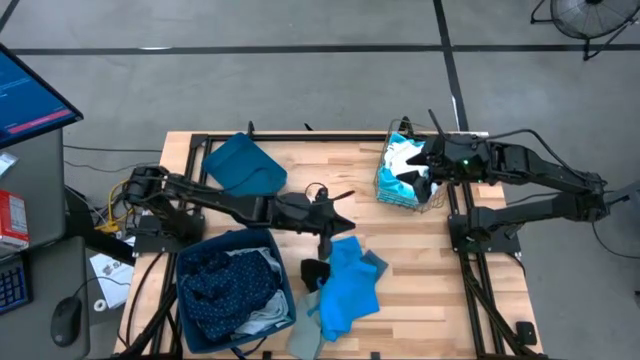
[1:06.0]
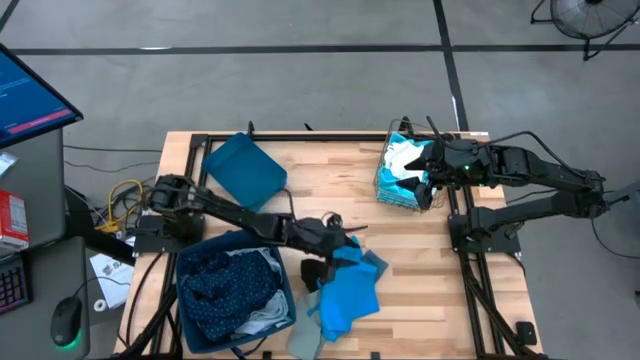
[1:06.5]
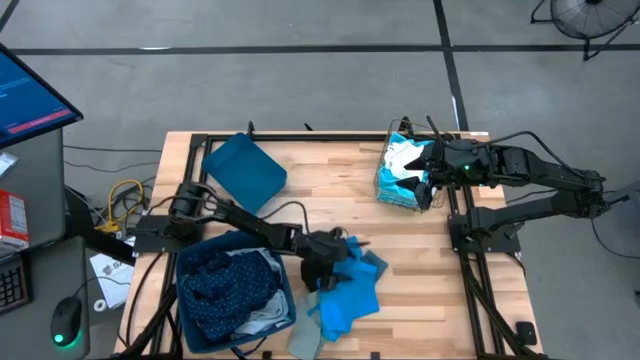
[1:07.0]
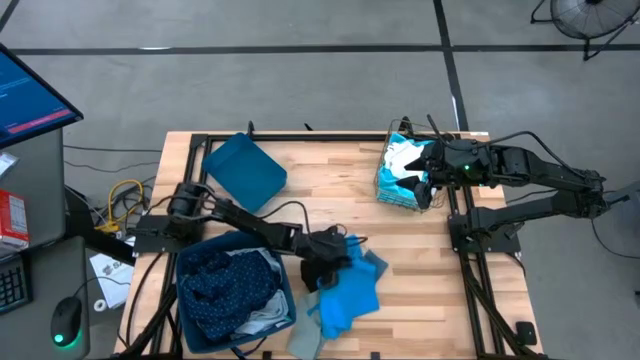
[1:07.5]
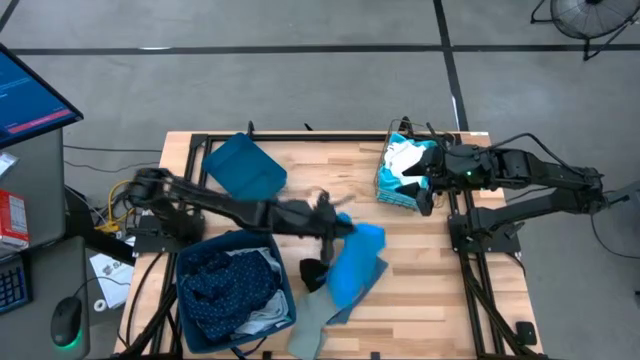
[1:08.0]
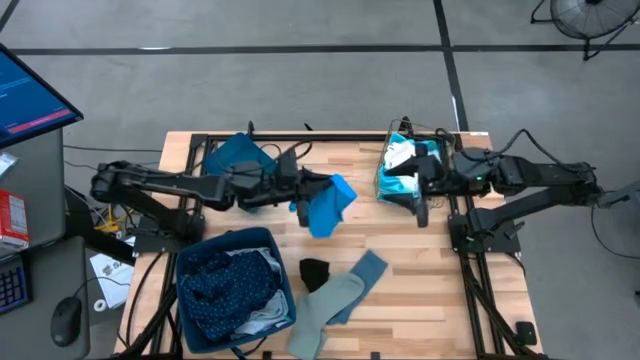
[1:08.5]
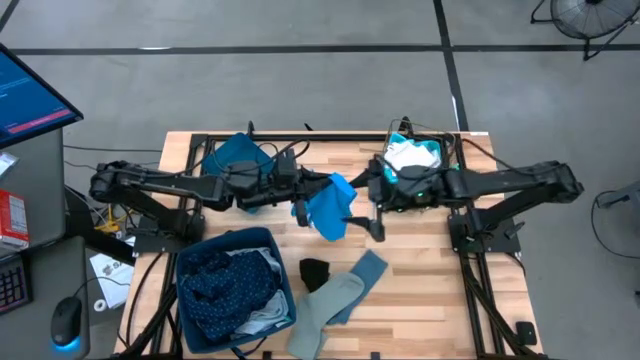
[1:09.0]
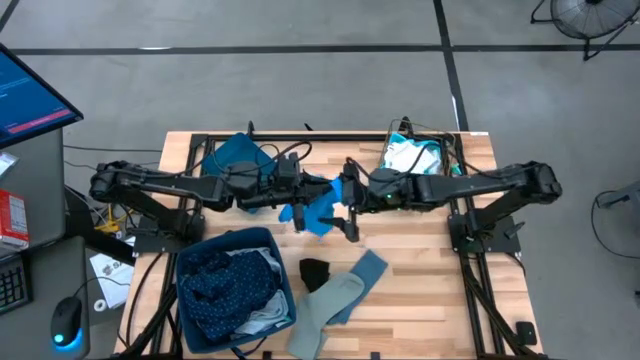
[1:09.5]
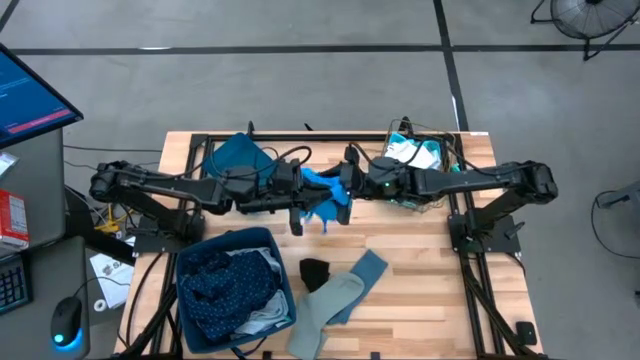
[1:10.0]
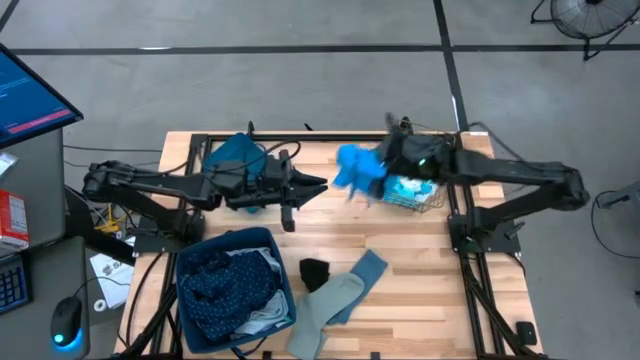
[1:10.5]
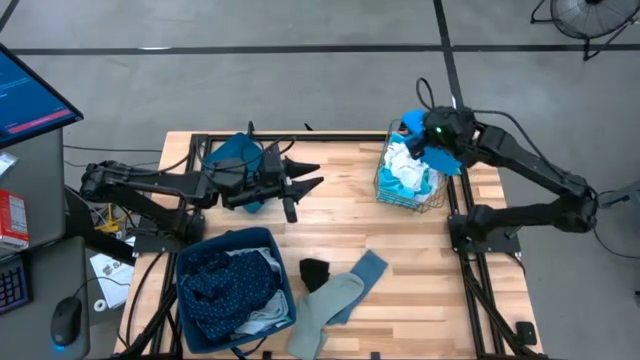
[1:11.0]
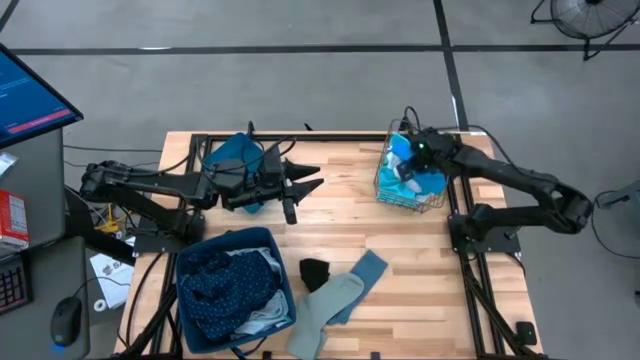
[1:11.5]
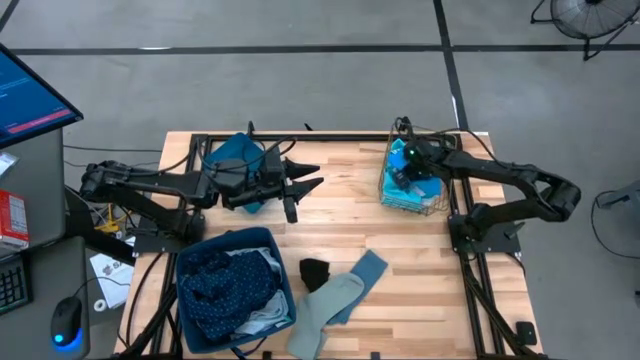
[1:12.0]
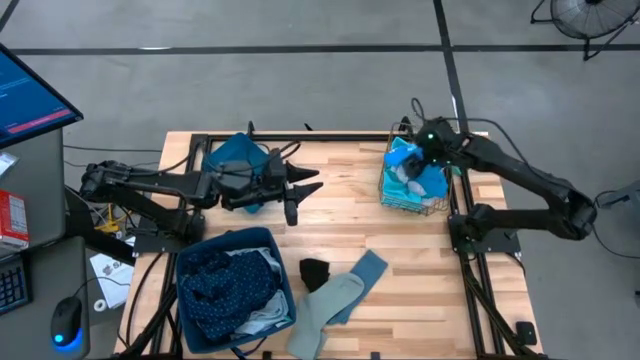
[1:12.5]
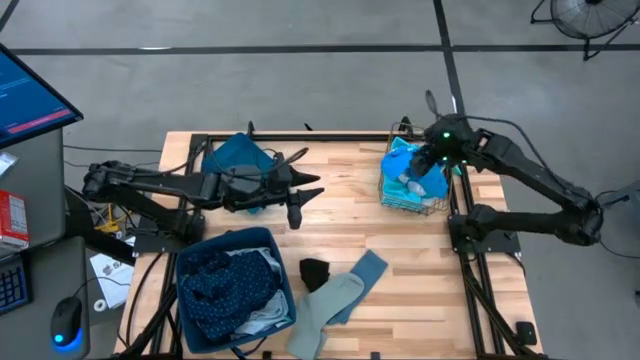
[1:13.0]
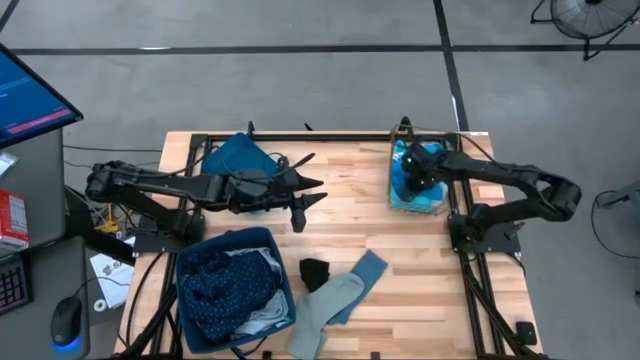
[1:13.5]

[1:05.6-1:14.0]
Task: Pick & Place Cloths
Put the blue shorts into the wire basket

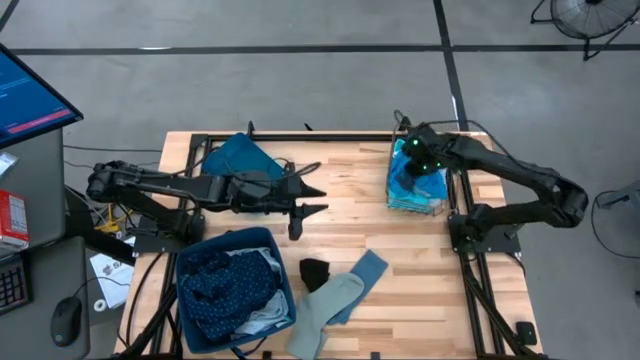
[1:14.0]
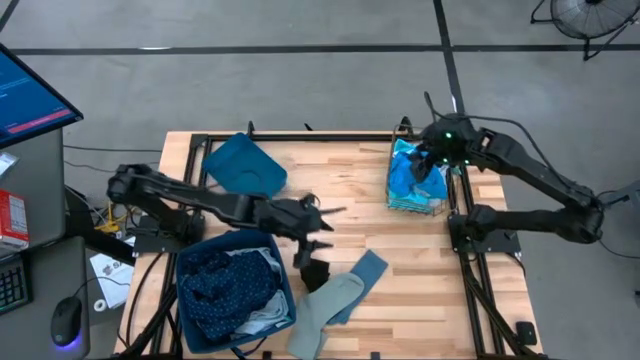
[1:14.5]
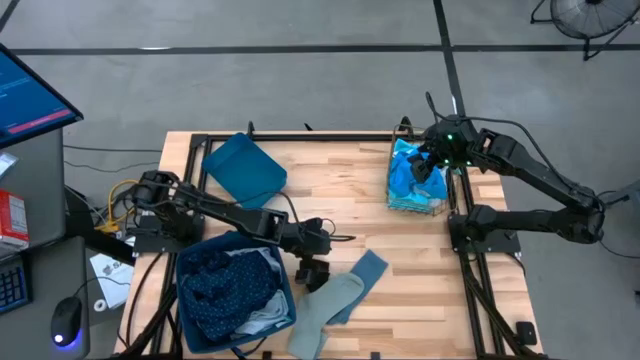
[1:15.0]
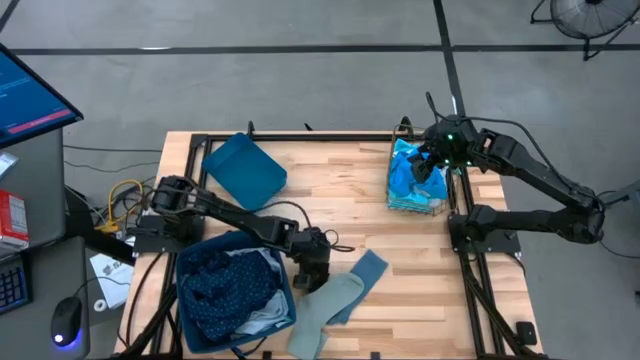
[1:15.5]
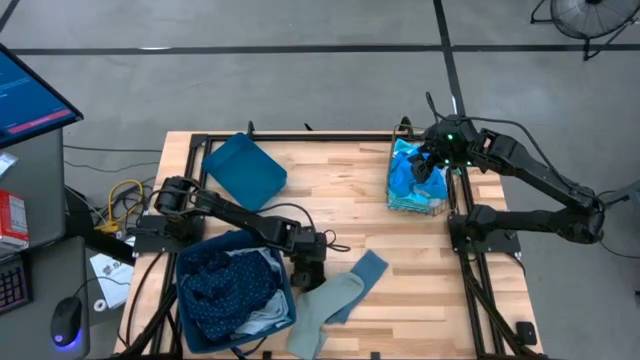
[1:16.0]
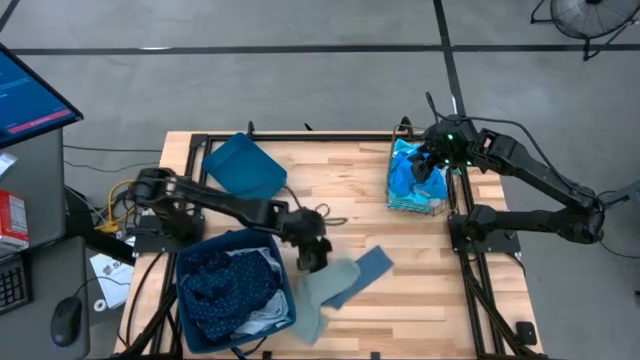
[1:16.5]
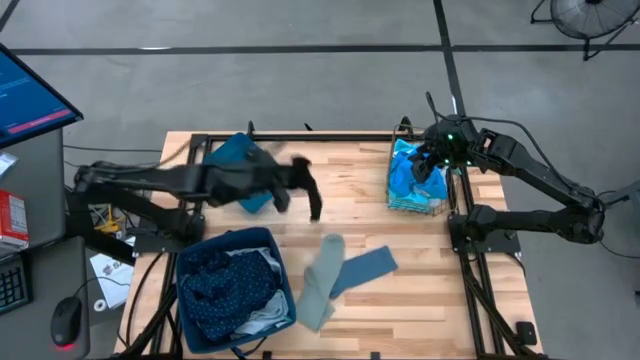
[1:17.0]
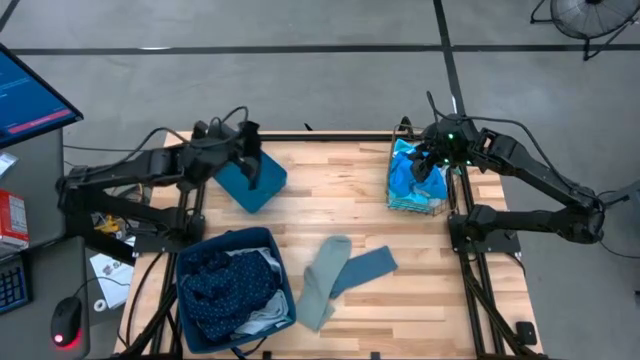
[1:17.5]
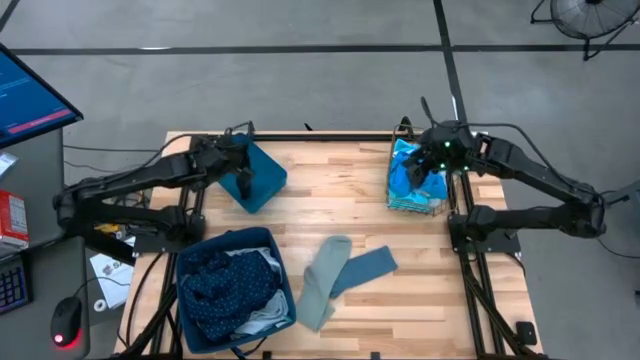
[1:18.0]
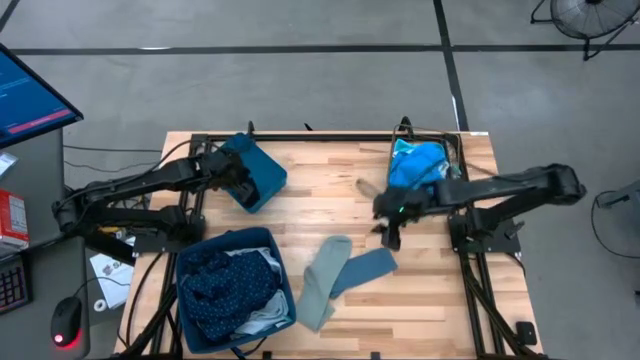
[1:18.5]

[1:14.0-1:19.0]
Put the black sock into the small blue bin

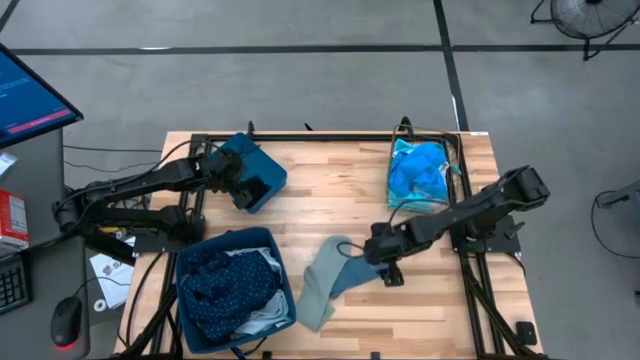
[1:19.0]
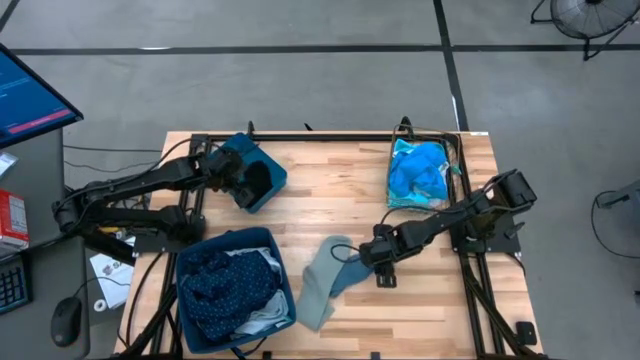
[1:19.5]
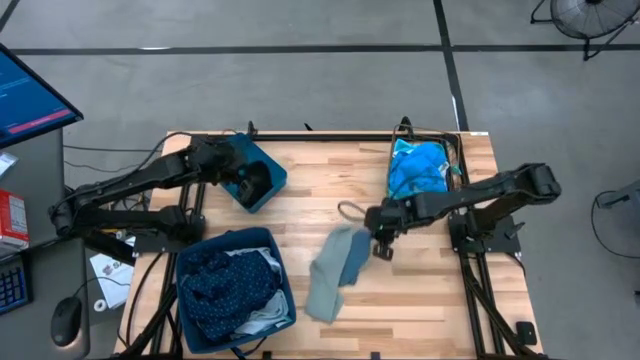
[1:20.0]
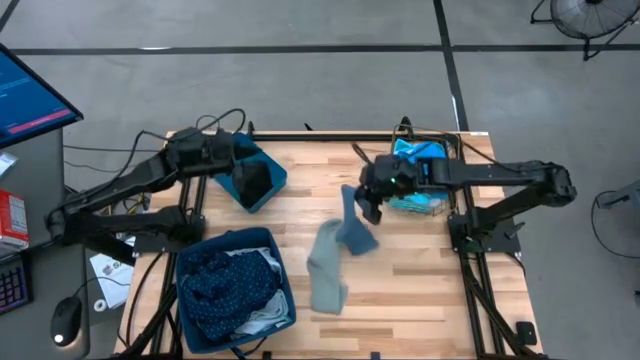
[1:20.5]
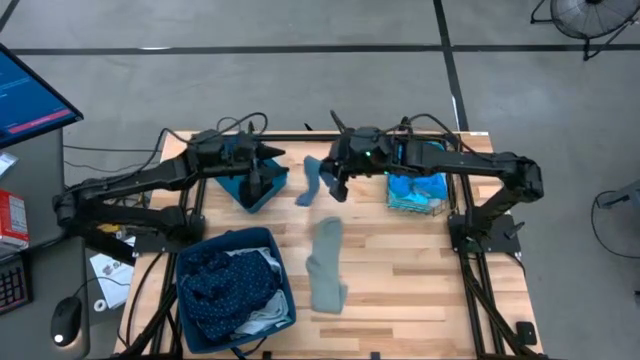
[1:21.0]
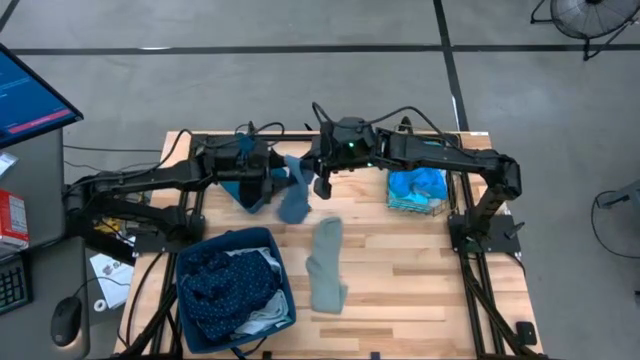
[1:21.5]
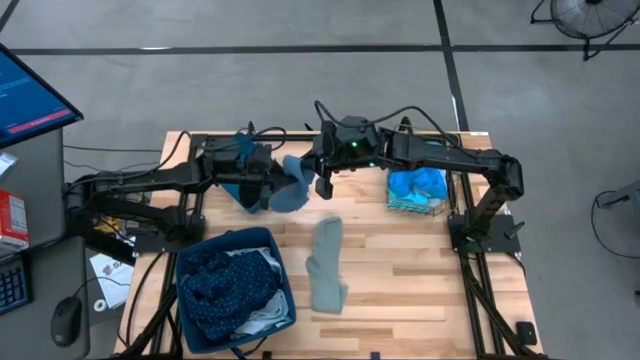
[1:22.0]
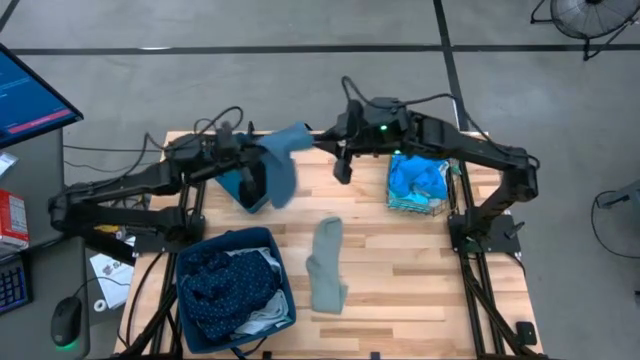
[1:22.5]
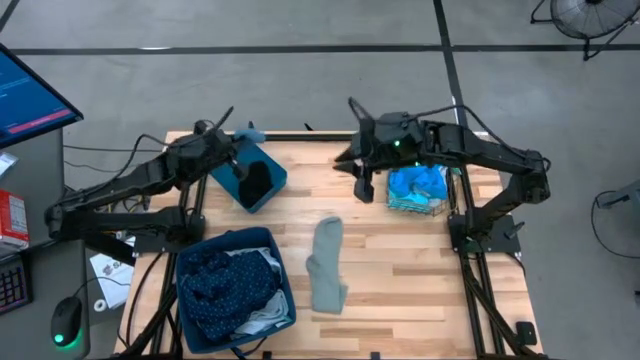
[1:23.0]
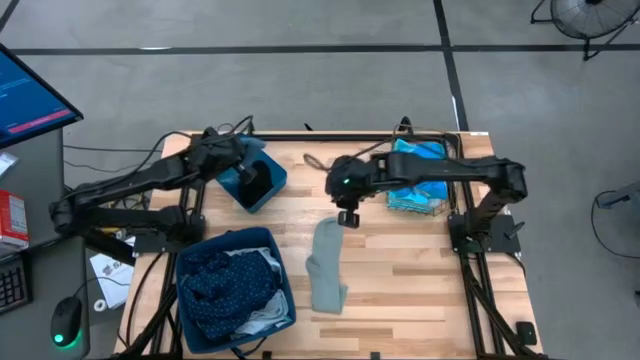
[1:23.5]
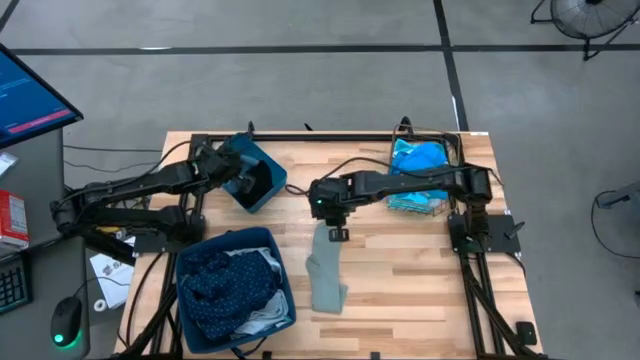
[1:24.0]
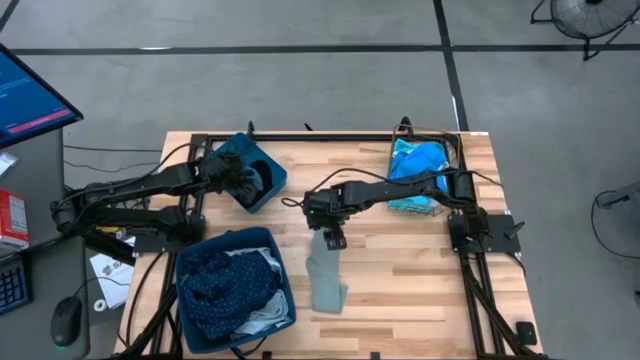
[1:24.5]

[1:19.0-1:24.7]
Put the blue sock into the small blue bin

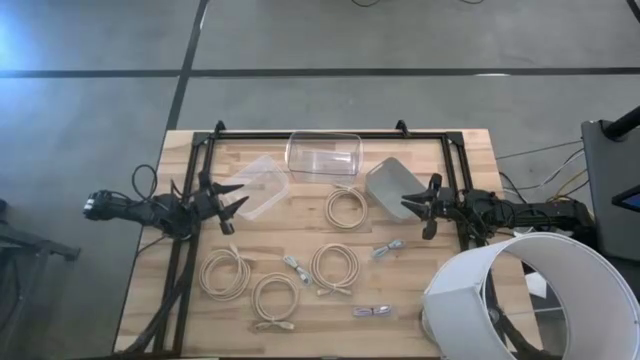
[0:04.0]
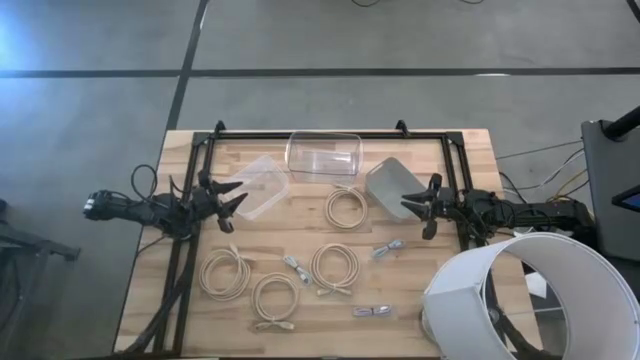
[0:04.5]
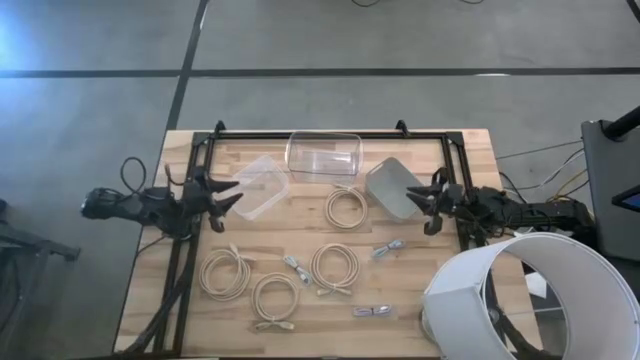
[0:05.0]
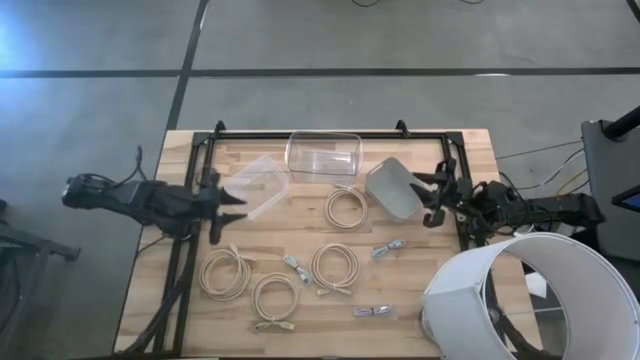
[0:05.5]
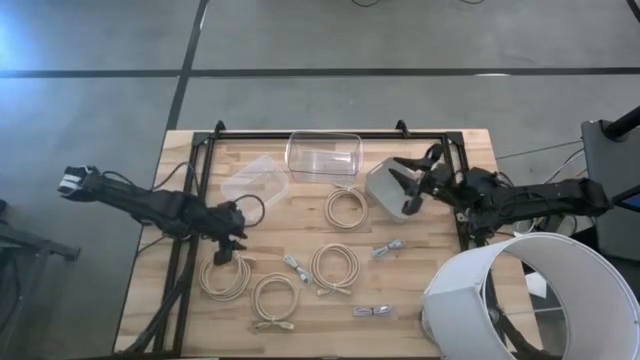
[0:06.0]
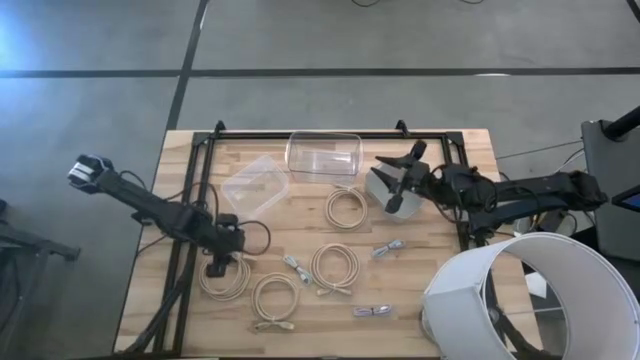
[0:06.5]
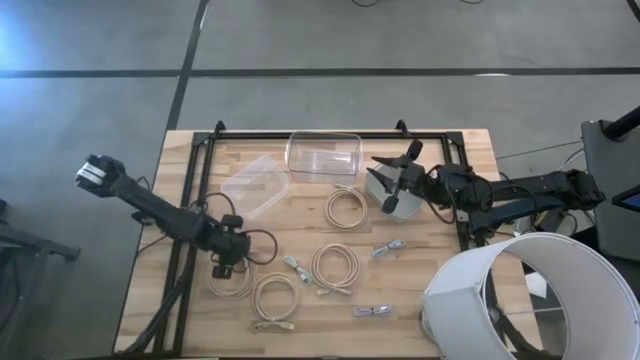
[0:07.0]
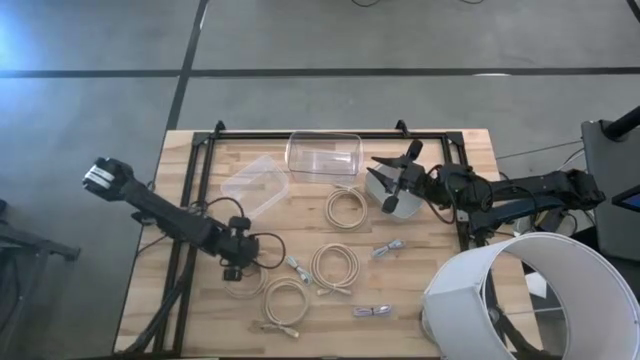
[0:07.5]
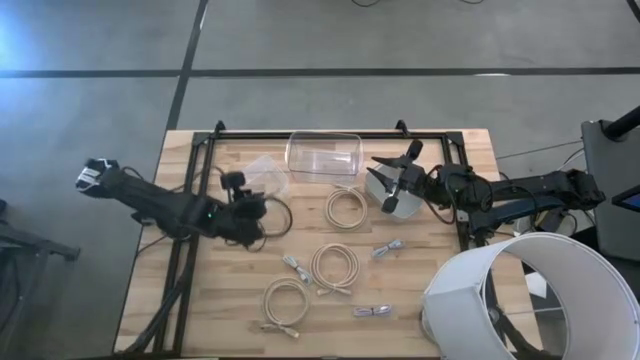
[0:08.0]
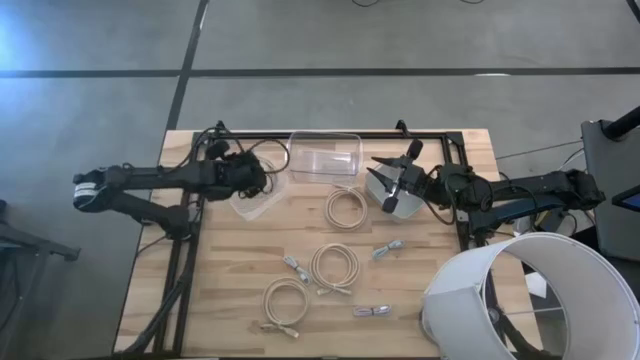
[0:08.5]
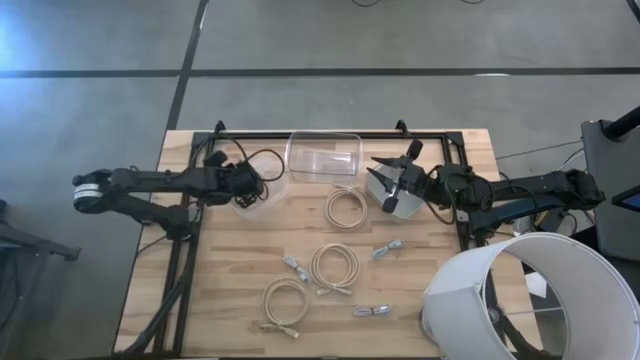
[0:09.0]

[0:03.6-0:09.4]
Task: Pick & Place USB Port
Put the brown HDMI cable into the left transparent bin
